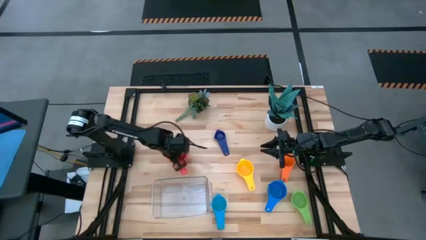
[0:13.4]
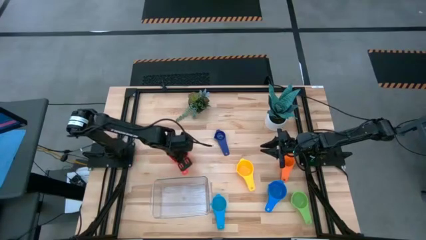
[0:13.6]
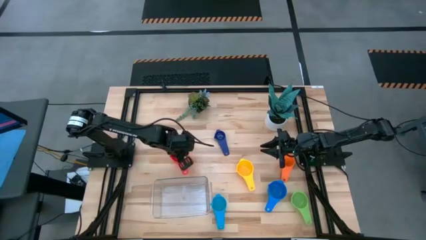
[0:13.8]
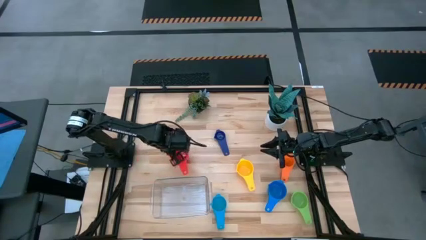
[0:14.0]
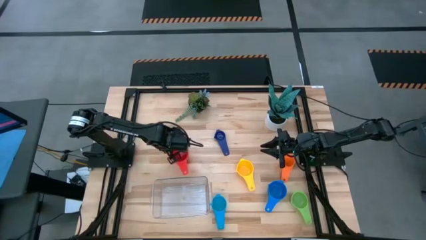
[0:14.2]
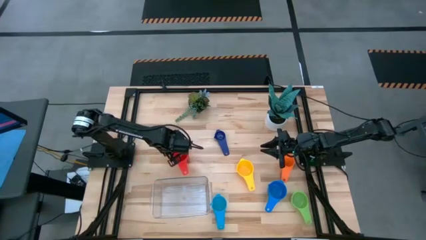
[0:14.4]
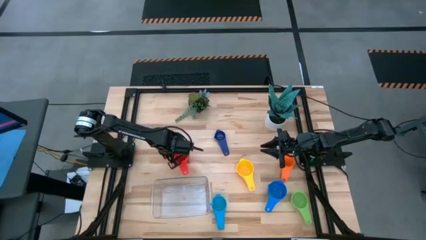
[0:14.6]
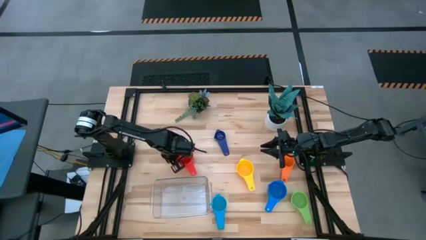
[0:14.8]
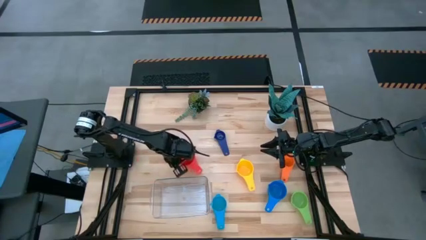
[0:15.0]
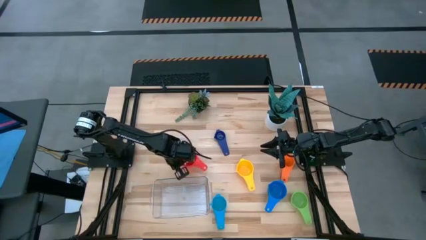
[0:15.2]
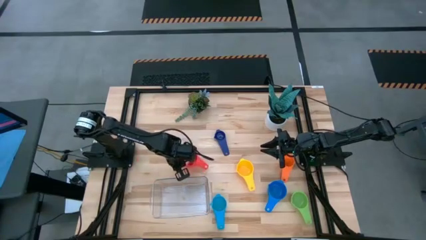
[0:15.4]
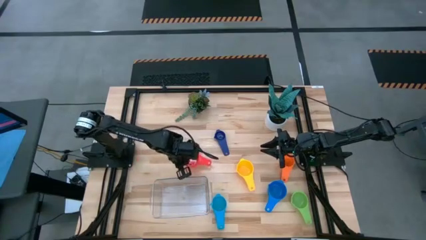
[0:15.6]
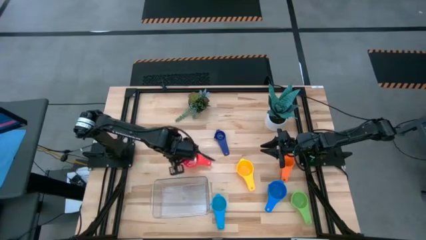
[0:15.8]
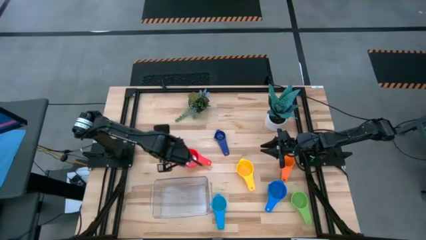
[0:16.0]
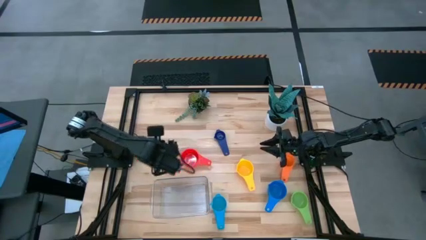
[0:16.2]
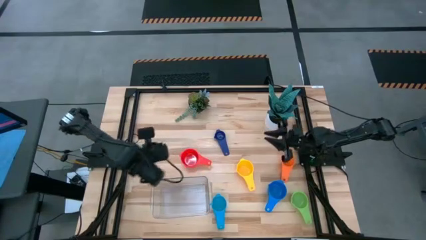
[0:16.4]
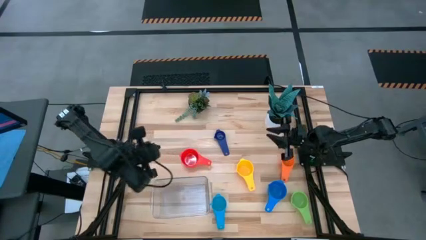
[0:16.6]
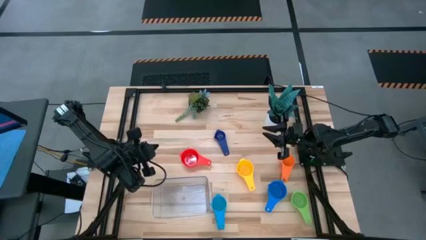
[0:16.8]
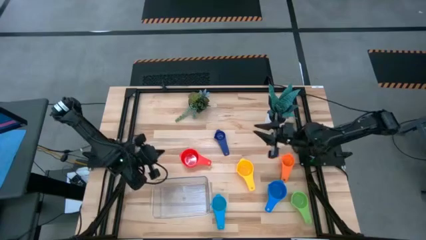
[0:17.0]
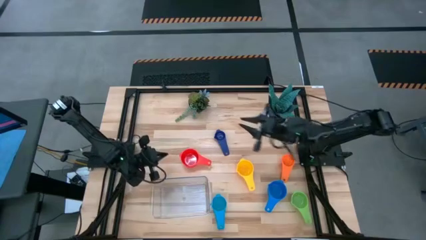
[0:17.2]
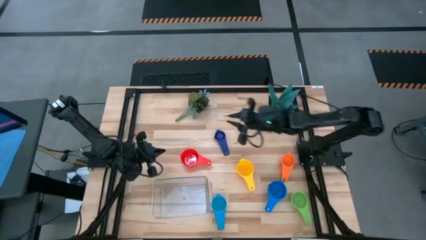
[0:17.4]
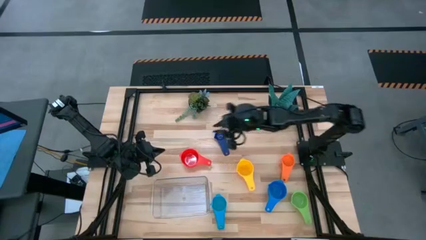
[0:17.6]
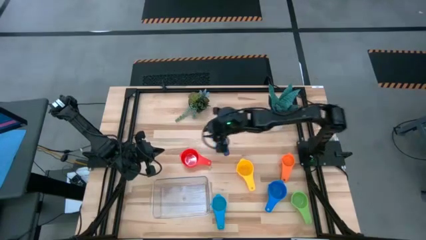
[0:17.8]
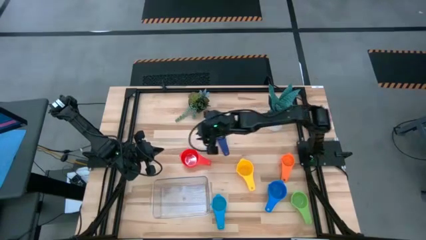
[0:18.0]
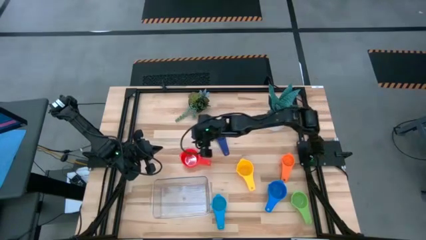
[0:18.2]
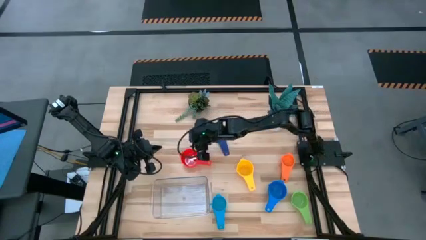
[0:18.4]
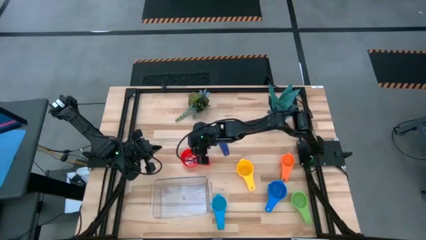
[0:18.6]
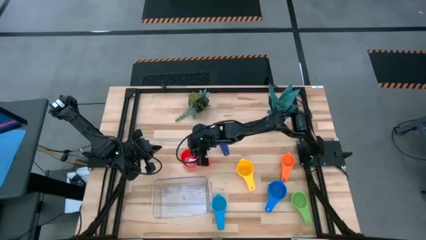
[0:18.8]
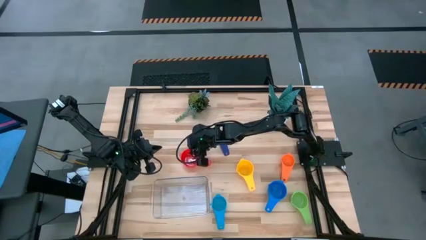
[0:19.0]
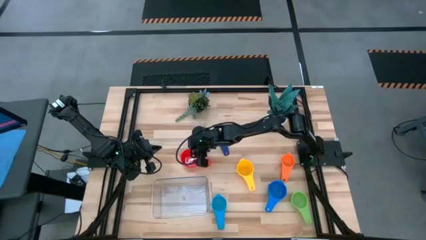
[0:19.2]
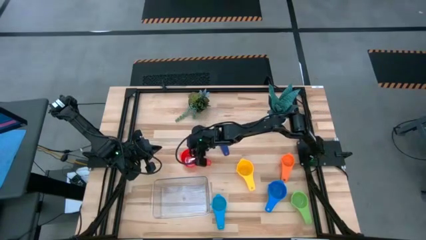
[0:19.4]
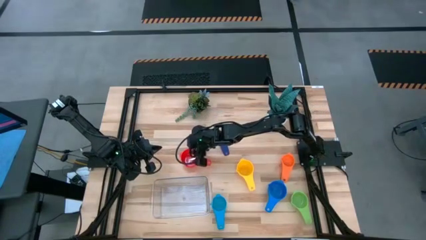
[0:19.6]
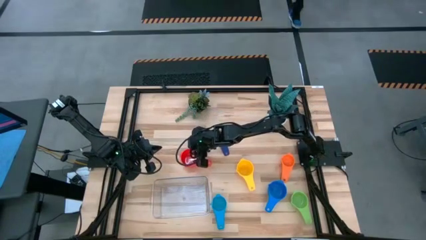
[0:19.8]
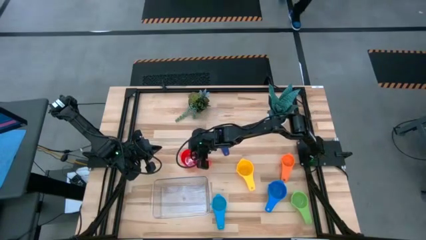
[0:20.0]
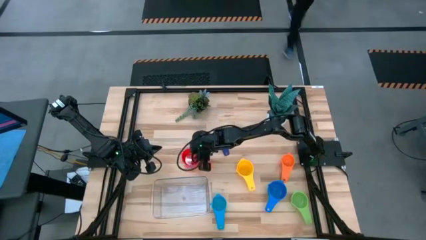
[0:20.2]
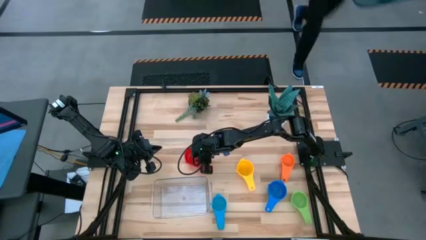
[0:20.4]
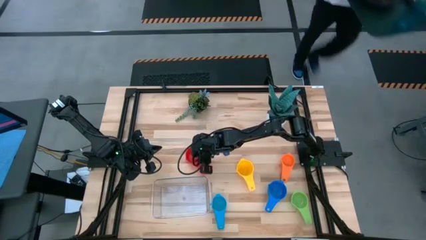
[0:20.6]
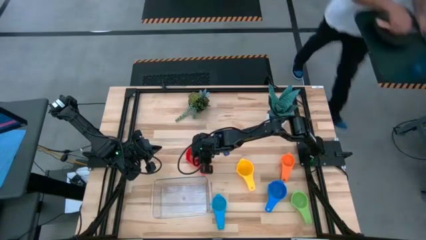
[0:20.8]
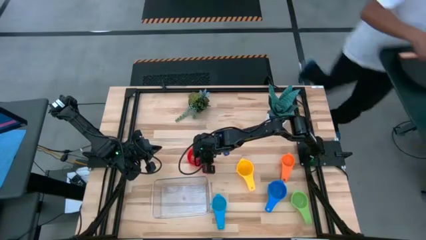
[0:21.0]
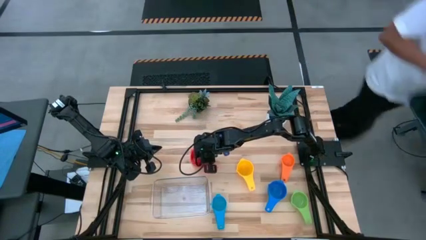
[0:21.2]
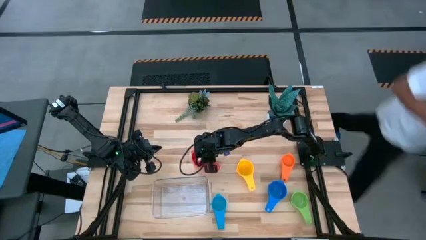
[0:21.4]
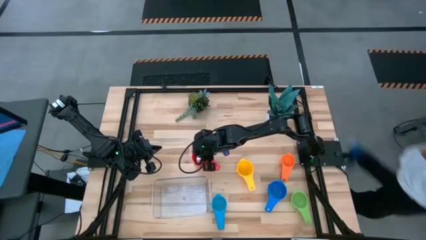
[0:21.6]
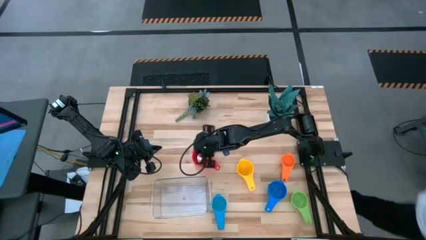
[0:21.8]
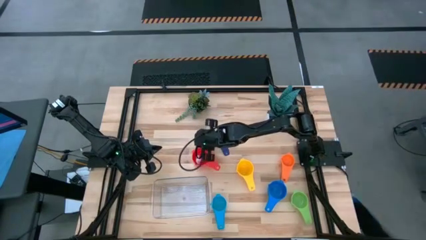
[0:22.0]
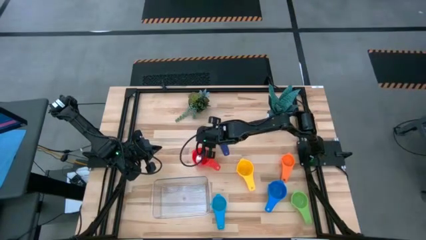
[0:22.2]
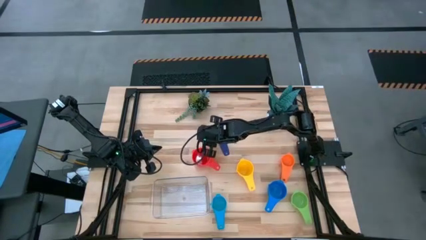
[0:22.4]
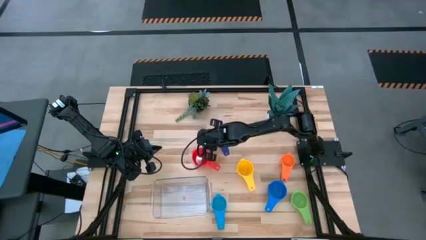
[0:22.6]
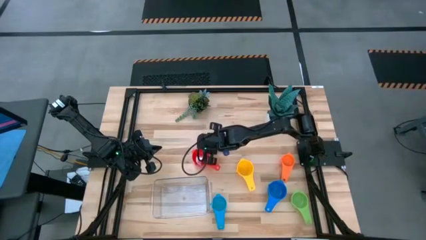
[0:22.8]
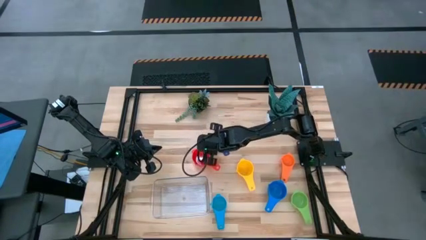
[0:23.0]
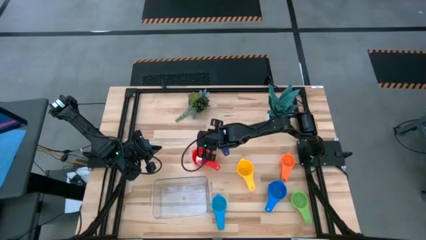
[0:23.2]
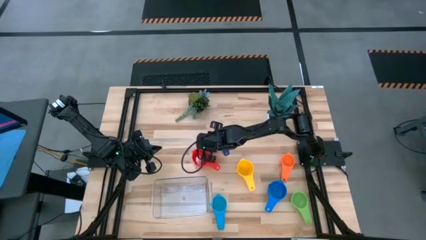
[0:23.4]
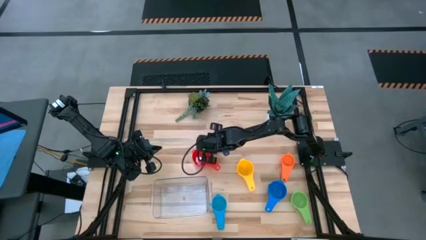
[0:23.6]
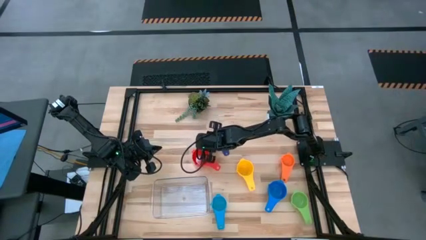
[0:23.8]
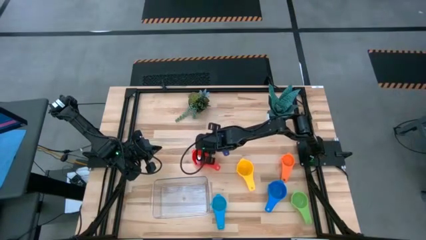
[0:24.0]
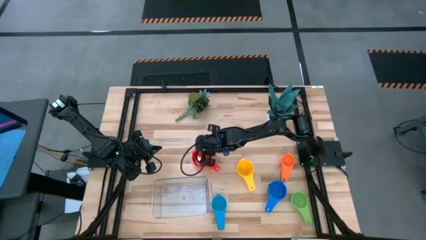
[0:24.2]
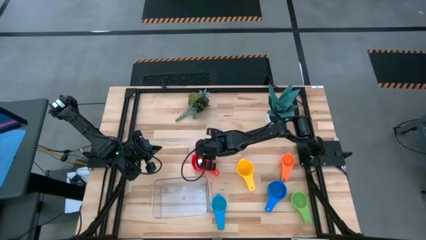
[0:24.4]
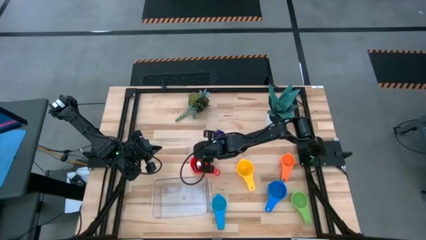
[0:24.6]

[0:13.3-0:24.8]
Task: Nest measuring cups in basket
Move the red measuring cup to the center of the table

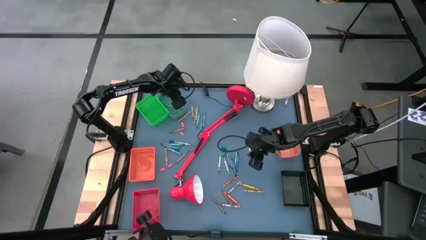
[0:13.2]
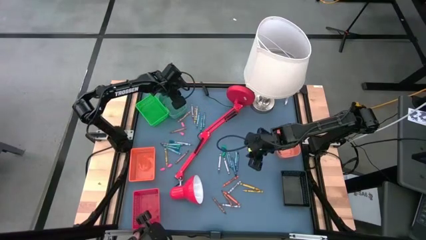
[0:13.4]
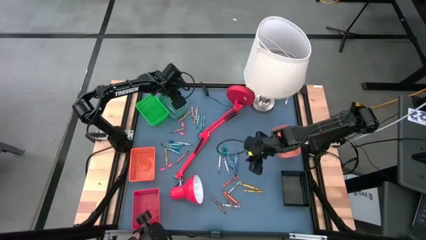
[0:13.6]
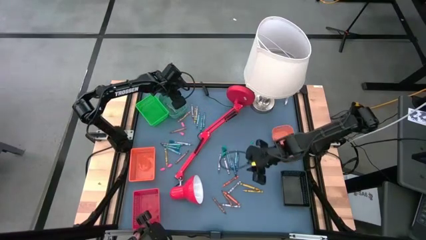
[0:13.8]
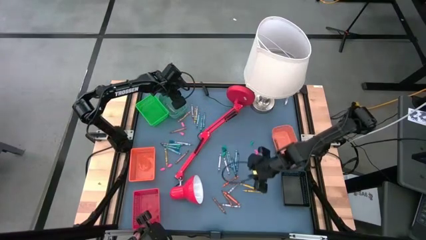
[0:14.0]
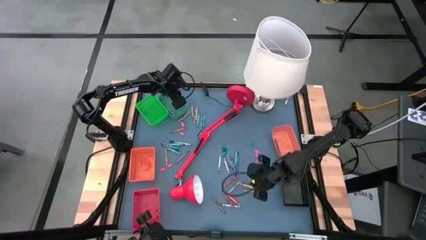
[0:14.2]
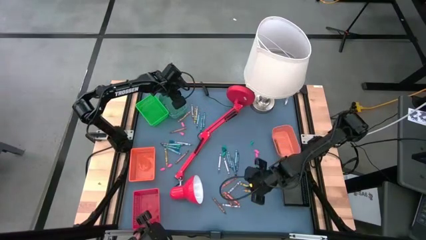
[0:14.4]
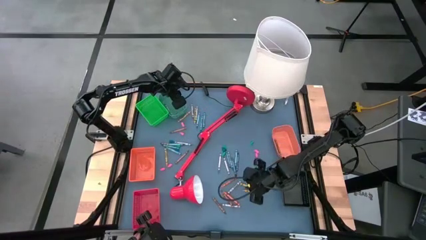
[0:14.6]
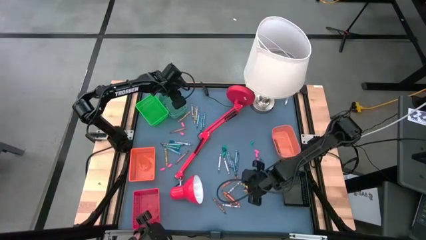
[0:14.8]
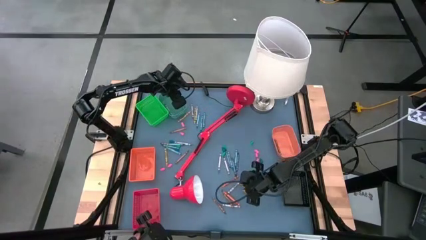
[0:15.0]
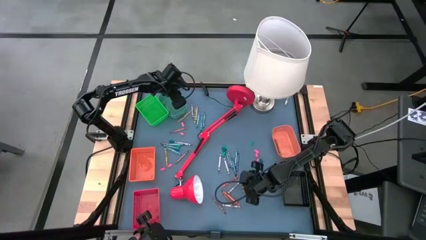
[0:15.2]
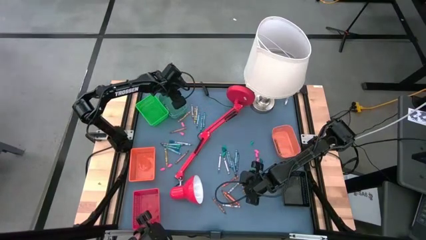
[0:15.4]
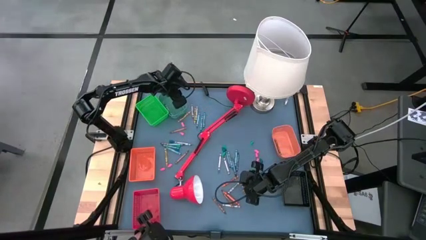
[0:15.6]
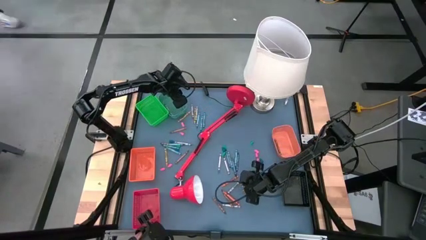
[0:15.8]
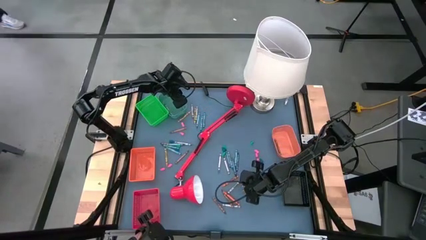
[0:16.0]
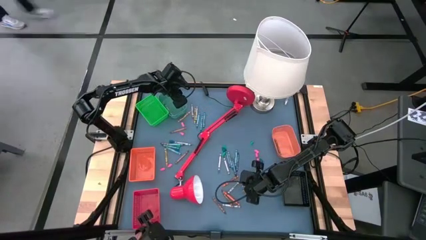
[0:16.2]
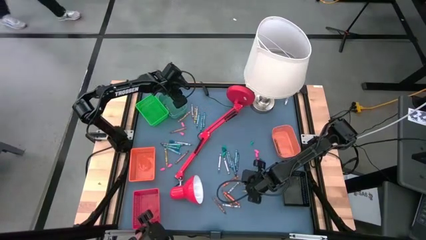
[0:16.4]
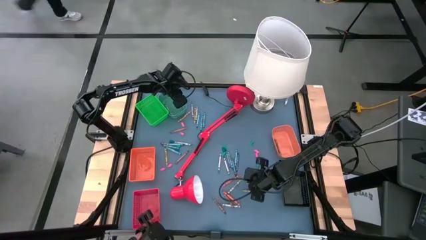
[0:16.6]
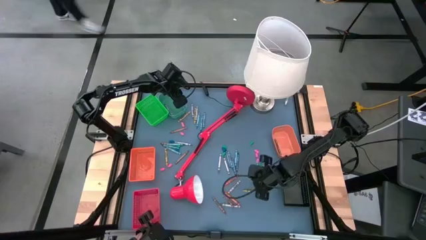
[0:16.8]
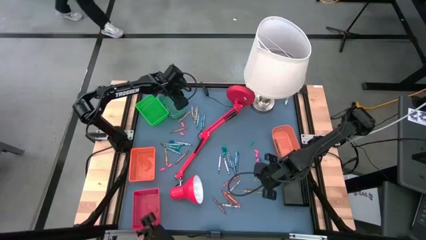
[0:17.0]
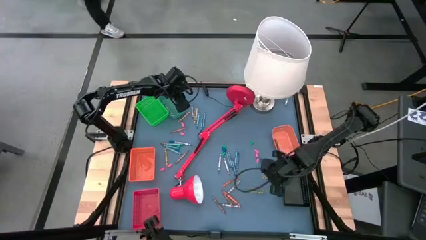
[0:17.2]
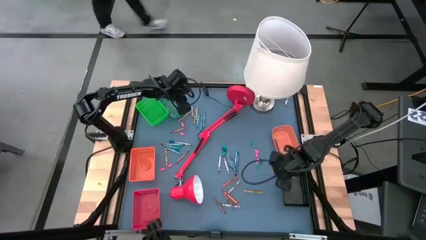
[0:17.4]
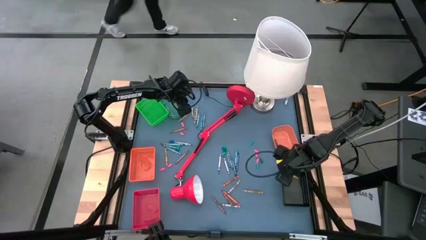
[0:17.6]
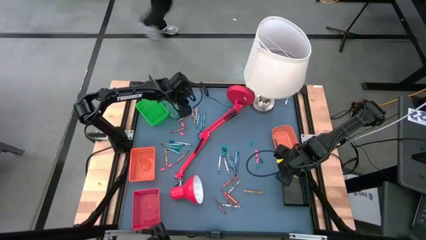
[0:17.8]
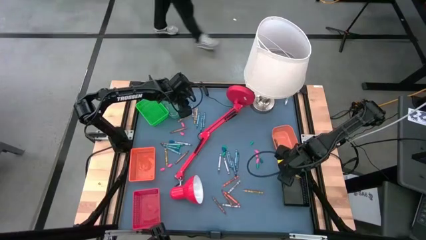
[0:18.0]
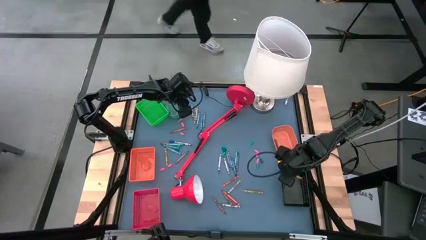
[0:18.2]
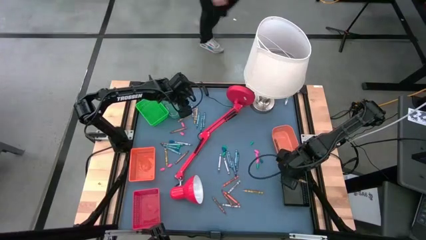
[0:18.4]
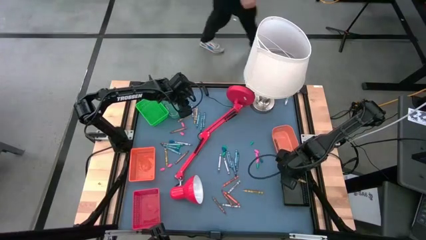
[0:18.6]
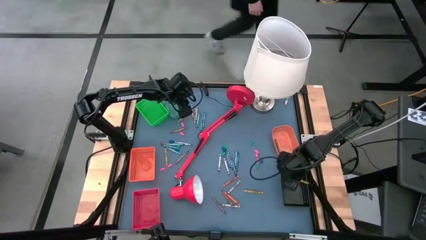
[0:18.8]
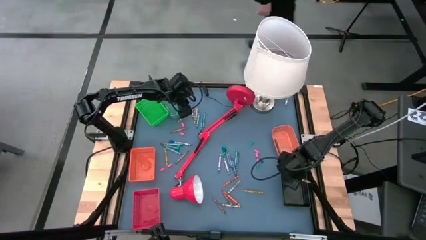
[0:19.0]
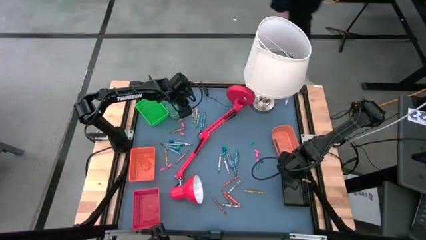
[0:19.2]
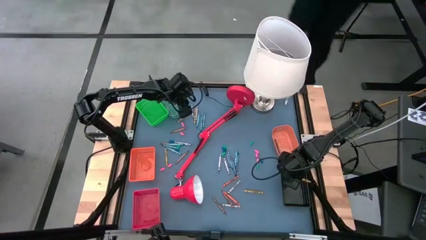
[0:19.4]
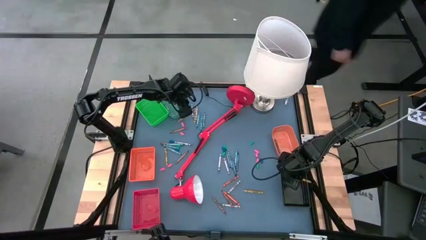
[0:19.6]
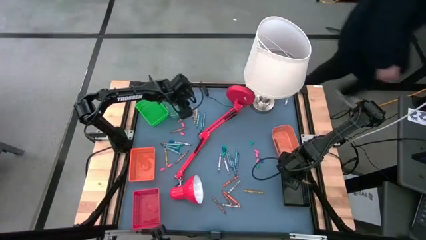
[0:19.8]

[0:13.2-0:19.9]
Task: Sort crayons
Put the yellow crayon into the black bin
